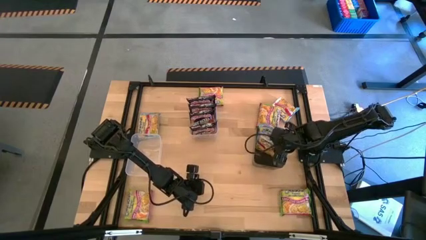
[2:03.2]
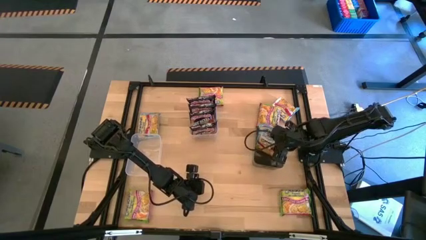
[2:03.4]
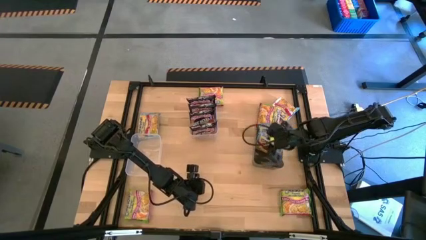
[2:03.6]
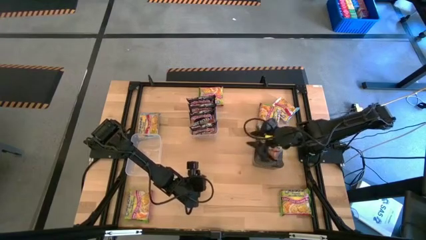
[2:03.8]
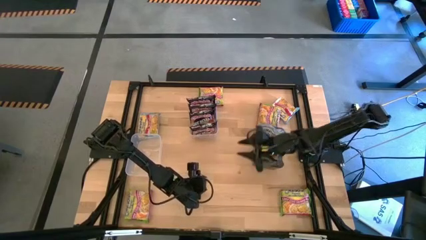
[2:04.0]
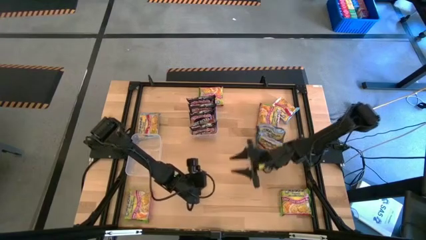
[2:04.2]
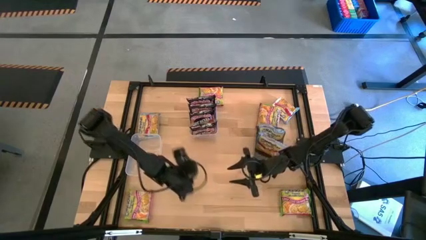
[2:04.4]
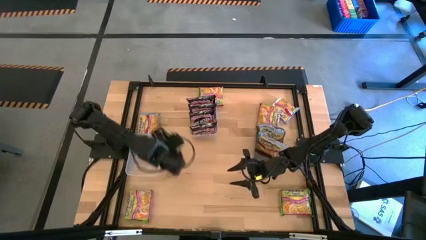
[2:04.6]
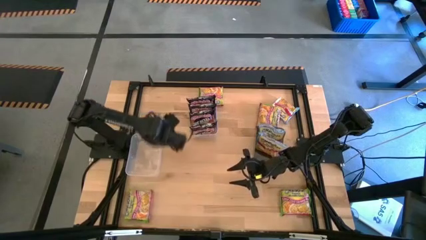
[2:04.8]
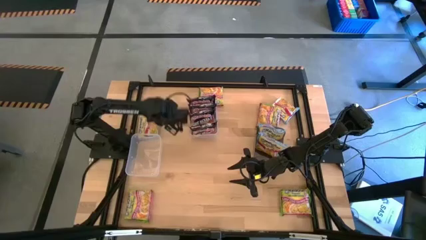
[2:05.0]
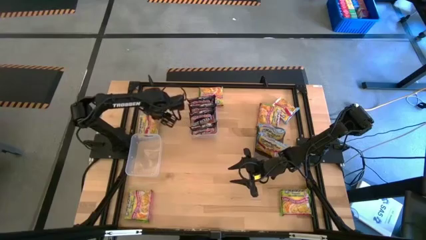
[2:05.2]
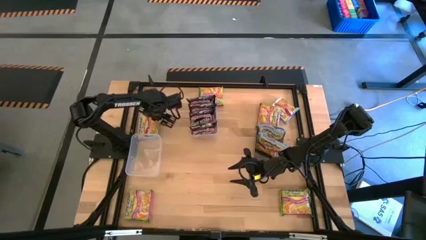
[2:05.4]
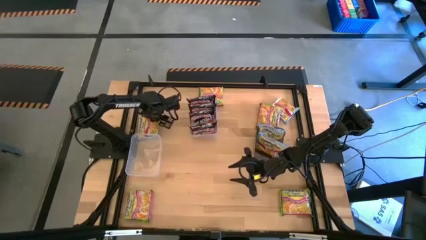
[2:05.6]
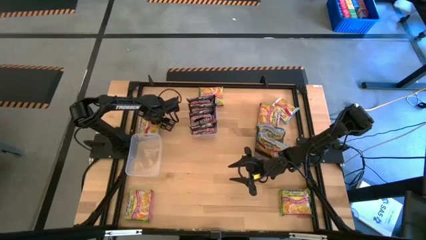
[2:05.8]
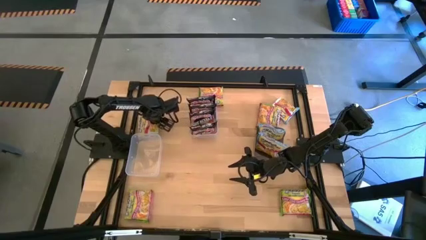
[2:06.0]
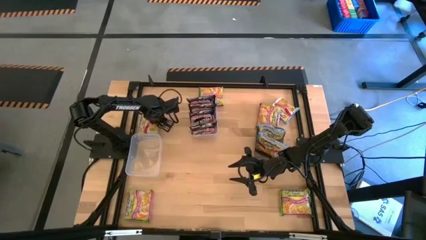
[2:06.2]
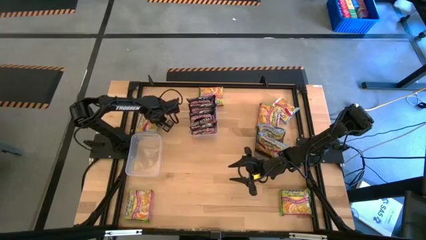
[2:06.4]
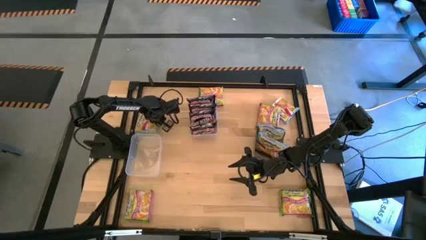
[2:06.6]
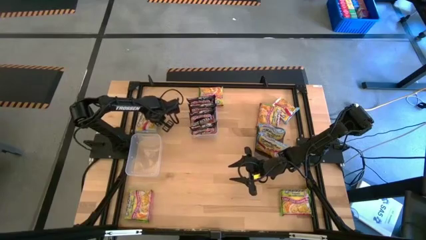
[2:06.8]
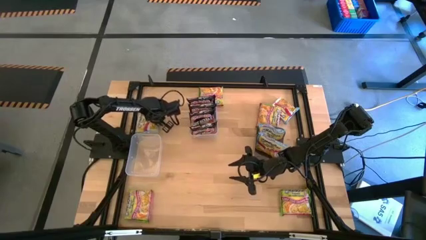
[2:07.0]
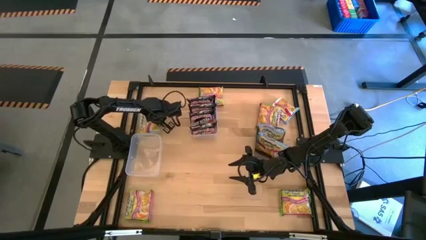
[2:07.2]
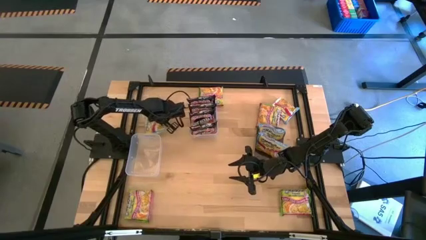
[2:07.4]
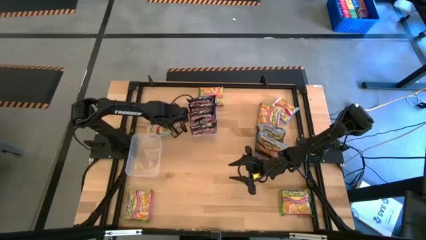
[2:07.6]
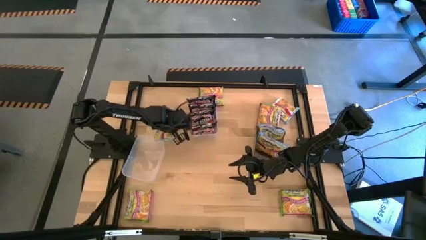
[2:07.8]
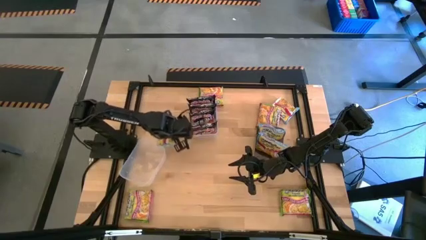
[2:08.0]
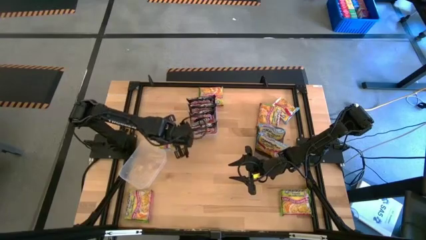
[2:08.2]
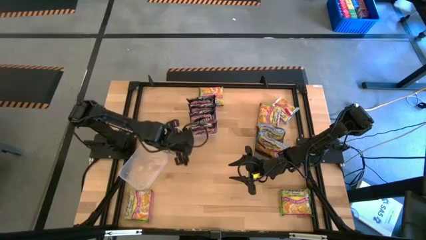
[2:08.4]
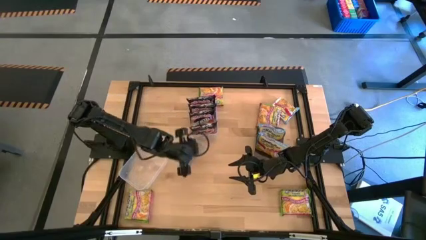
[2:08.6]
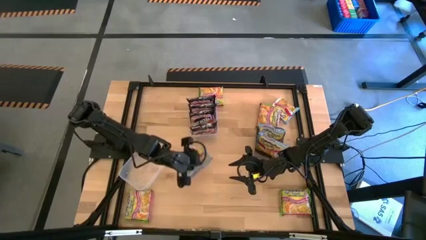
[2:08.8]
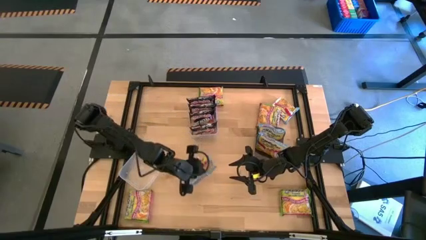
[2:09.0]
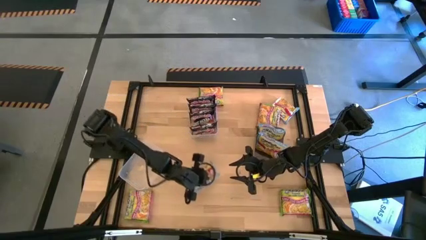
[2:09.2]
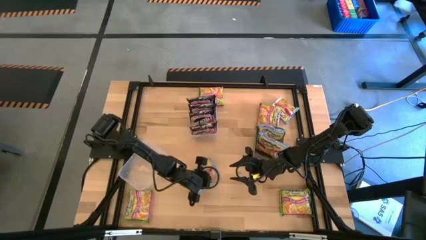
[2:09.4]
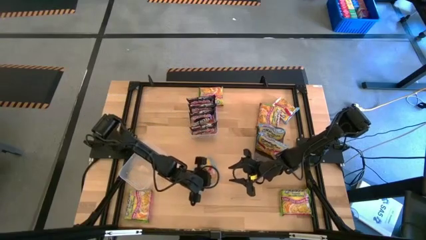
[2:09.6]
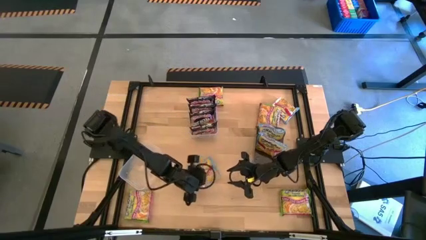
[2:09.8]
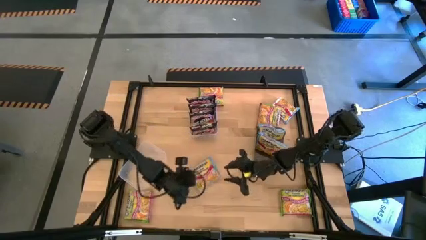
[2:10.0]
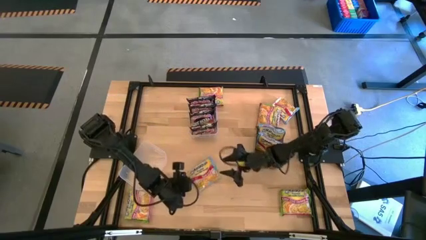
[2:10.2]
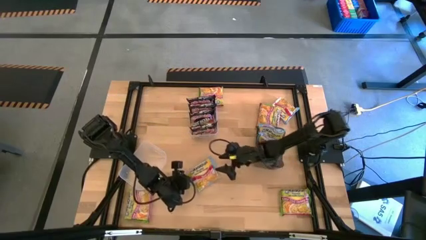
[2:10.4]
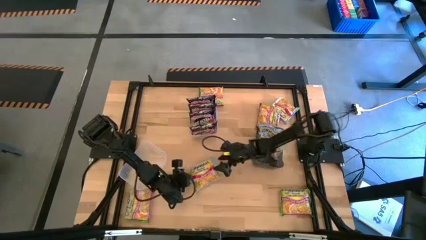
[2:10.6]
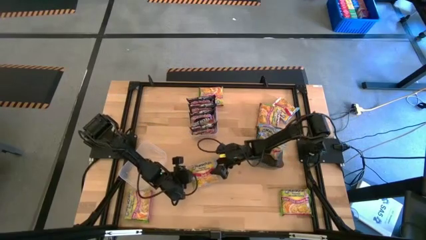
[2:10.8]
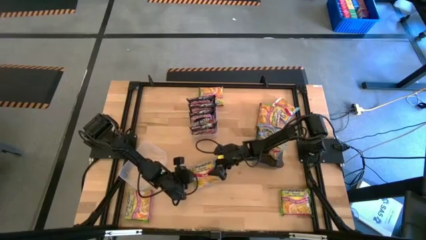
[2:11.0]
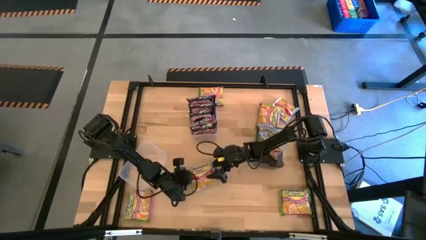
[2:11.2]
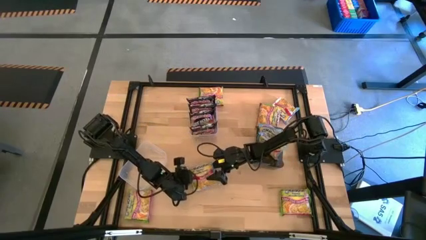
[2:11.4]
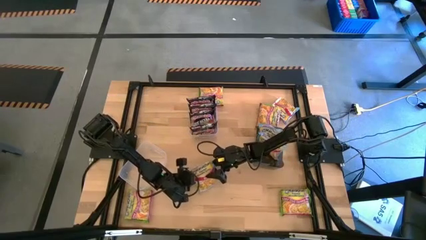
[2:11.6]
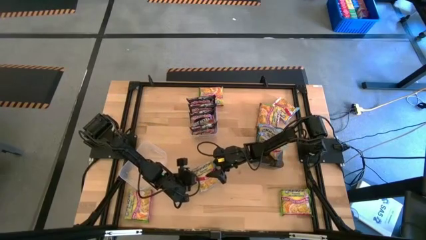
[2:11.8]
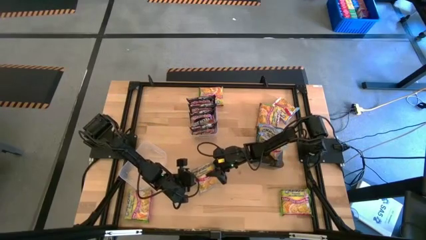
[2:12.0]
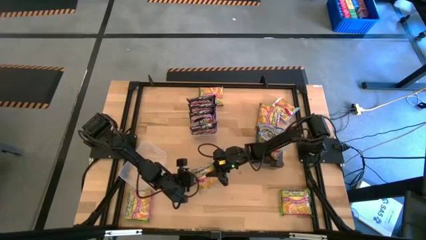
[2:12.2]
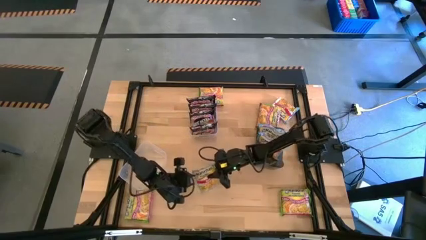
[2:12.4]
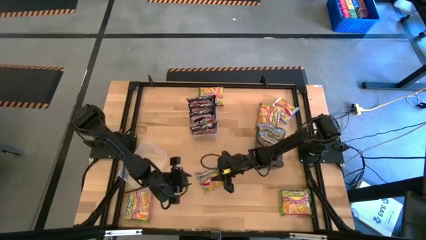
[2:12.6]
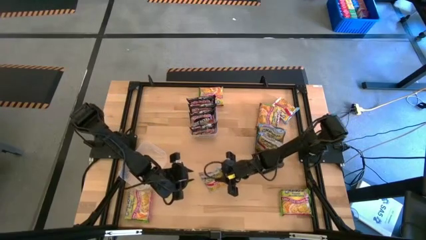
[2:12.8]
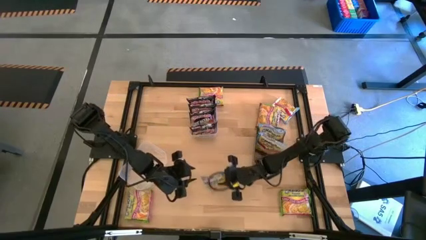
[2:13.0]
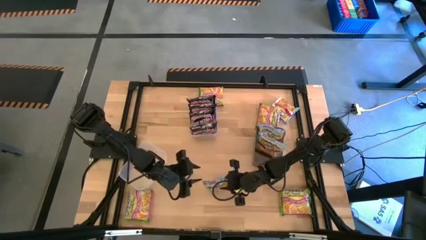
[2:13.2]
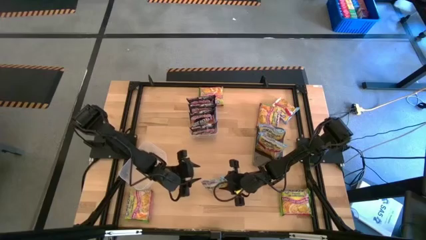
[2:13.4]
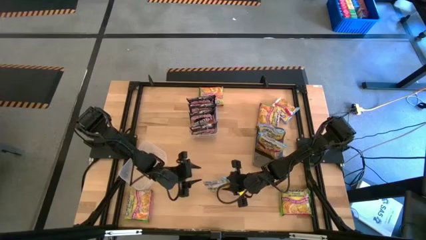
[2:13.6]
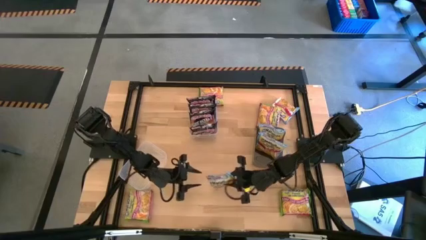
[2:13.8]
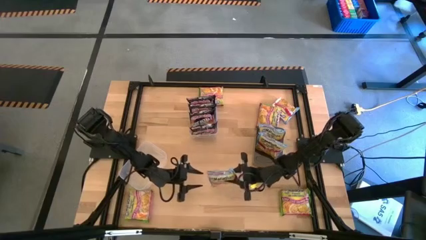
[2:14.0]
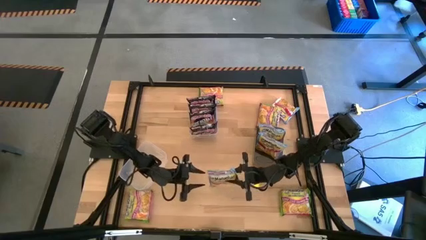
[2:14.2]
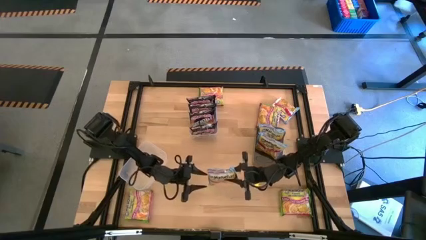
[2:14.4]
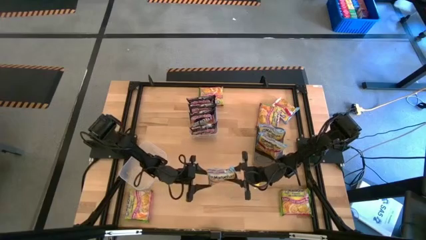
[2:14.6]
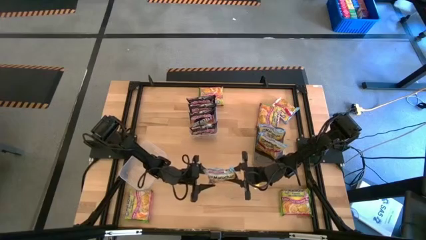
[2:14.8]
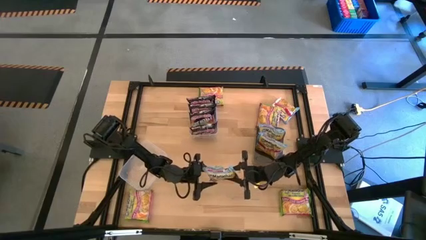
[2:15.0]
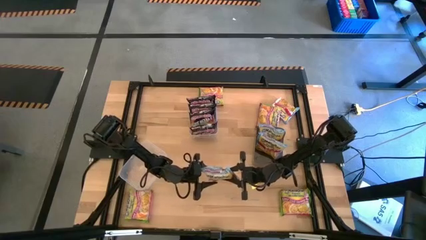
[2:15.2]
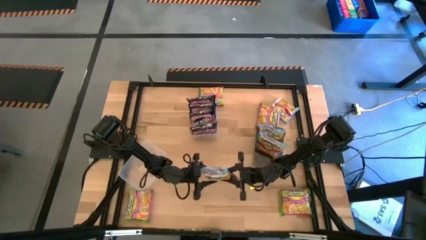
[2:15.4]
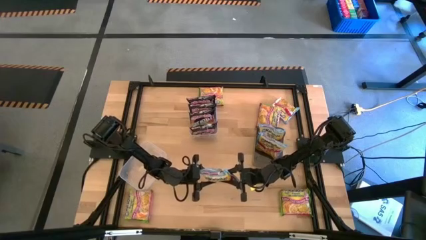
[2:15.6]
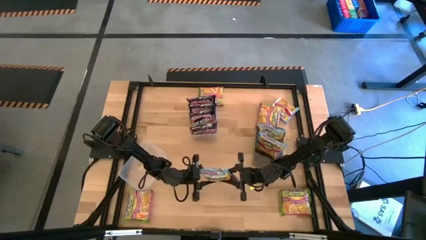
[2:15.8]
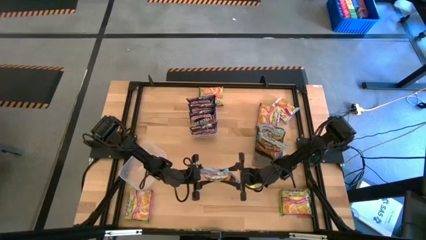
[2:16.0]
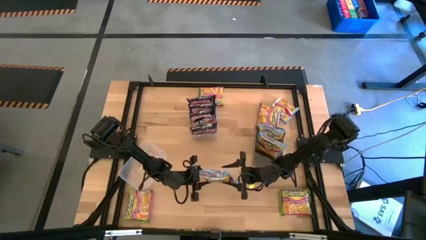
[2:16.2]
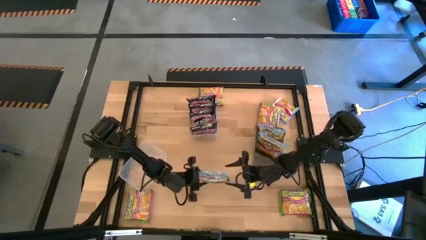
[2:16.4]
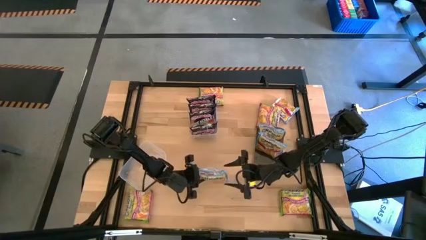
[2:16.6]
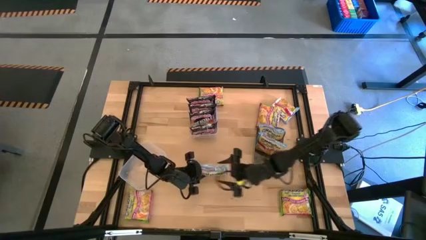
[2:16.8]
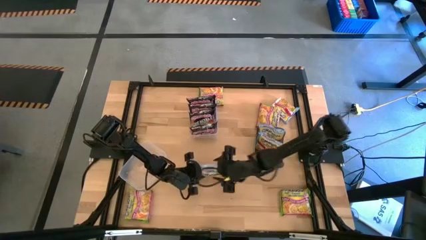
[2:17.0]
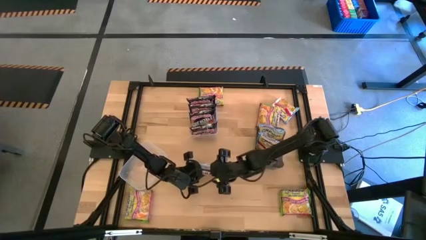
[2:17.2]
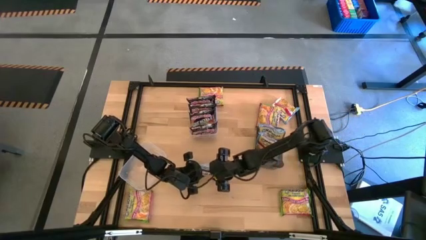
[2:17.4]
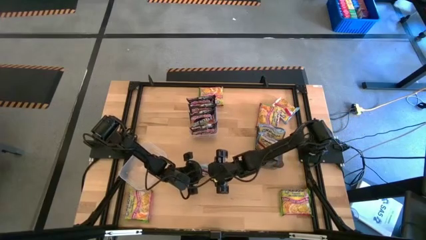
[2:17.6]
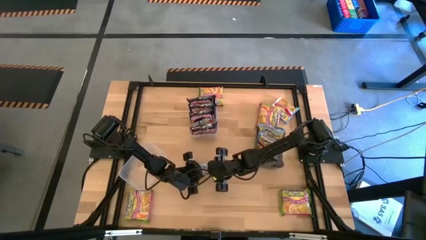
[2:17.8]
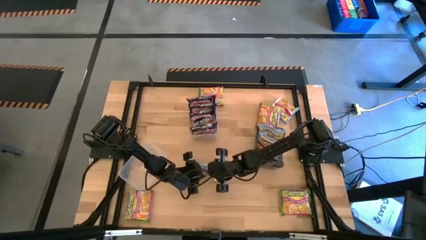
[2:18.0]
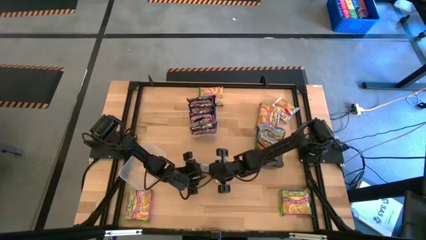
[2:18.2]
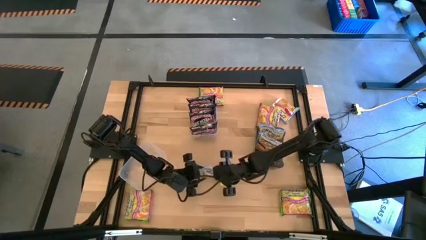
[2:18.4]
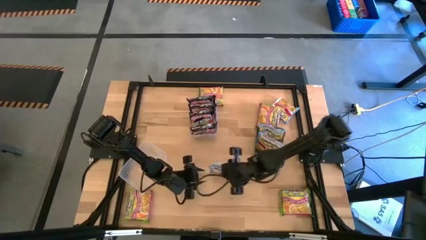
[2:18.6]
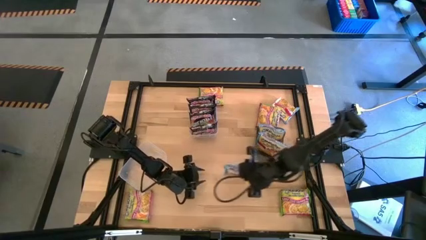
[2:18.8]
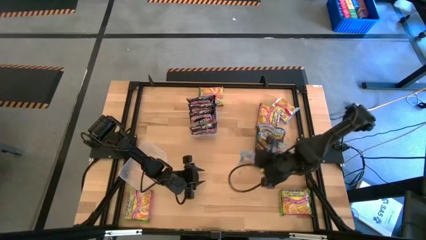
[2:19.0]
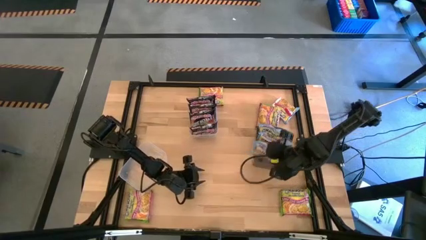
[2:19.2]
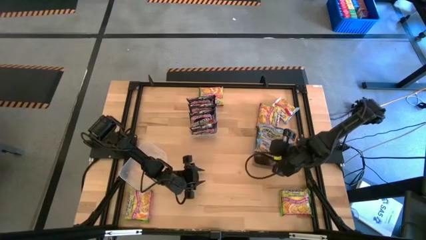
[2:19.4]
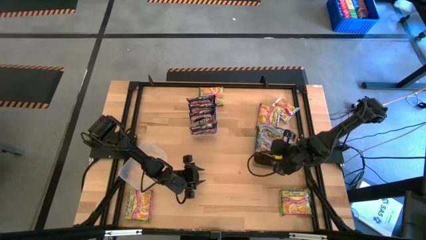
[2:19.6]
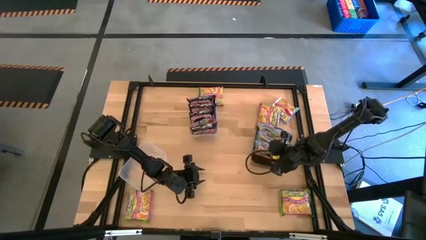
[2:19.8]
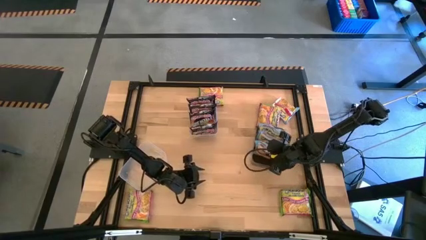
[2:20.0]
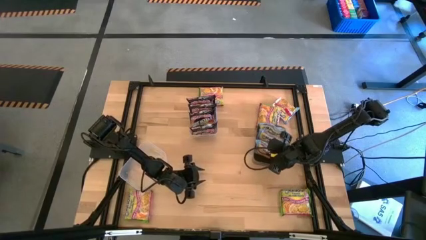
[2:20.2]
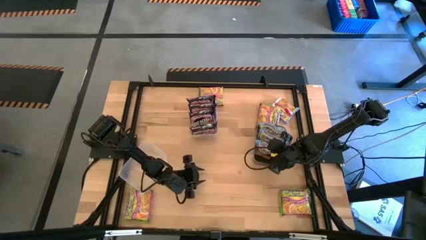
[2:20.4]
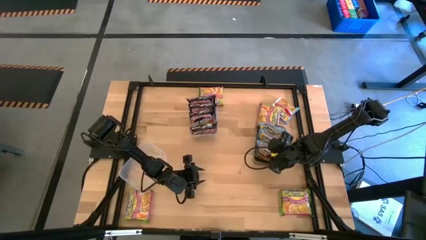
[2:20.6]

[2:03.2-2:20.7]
Task: Sort Maruchan noodles
Put the blue noodle pack into the black bin
